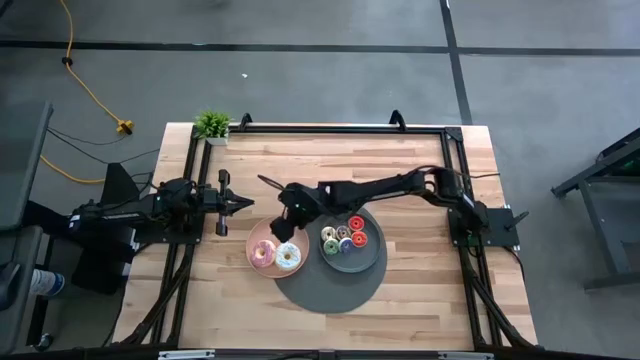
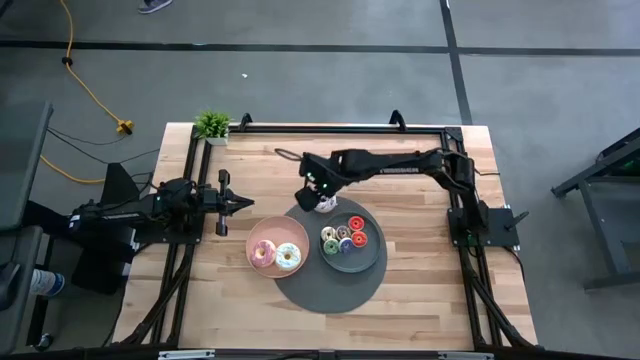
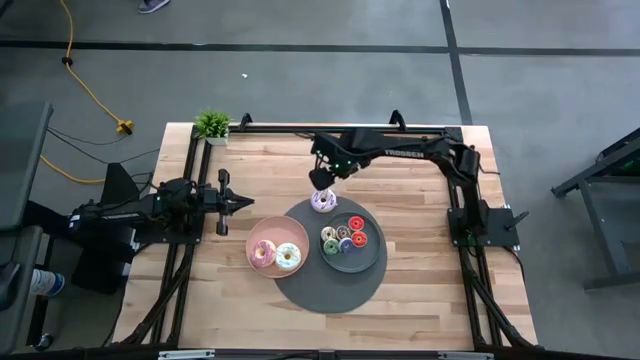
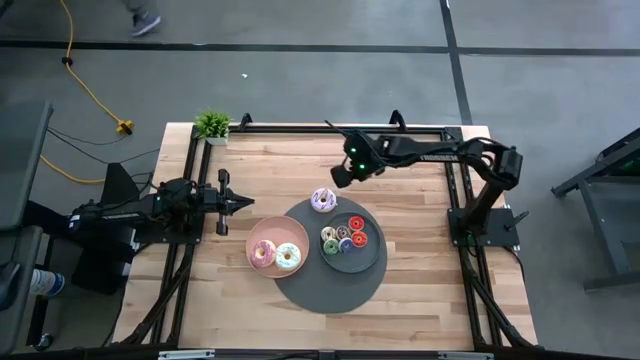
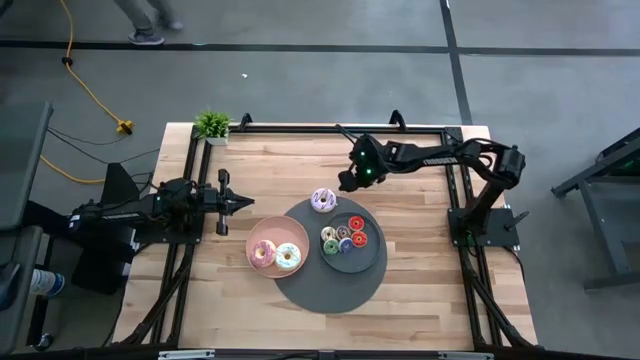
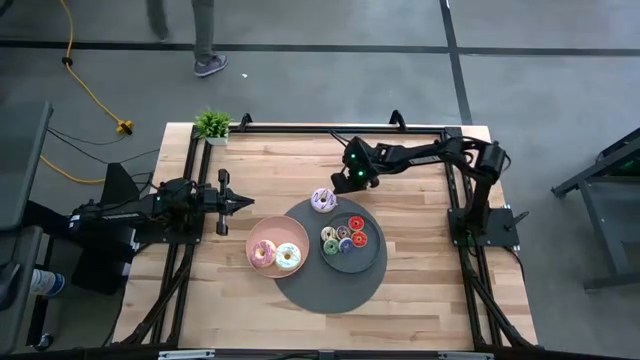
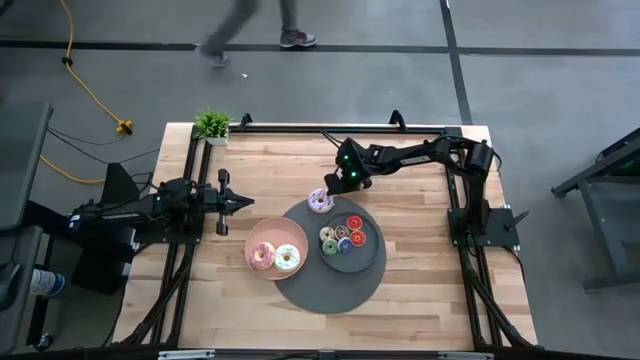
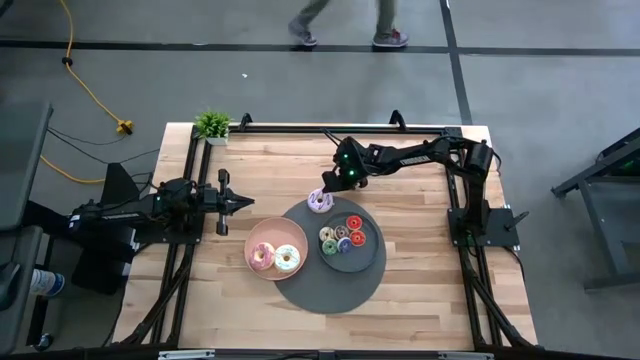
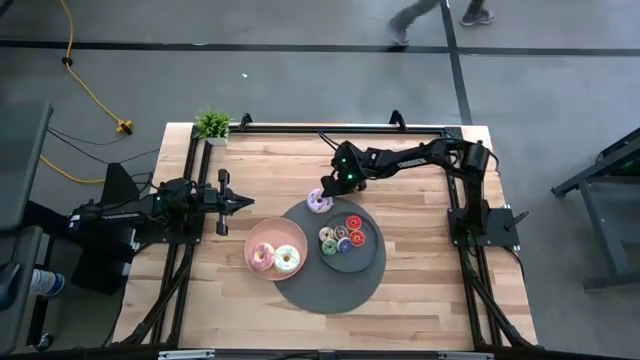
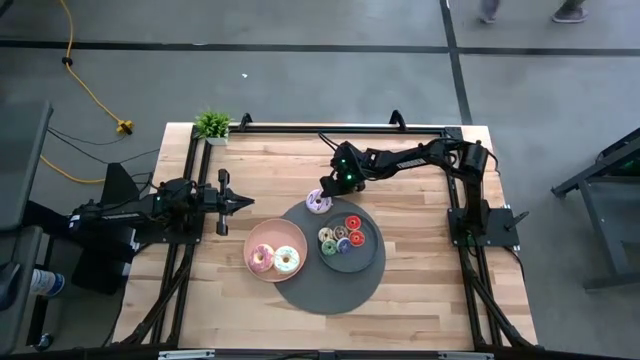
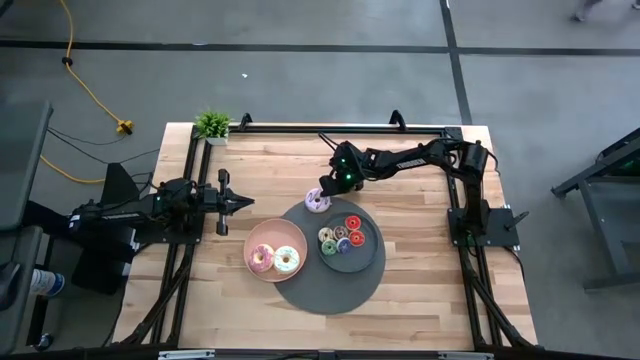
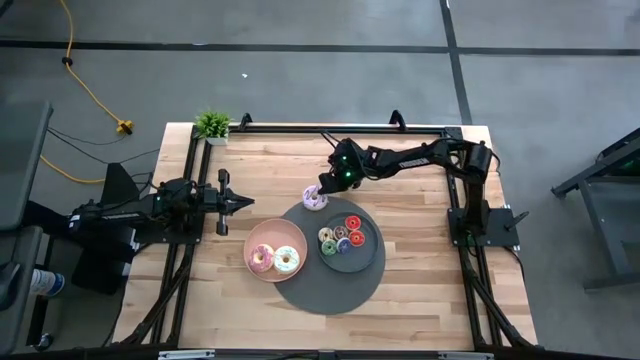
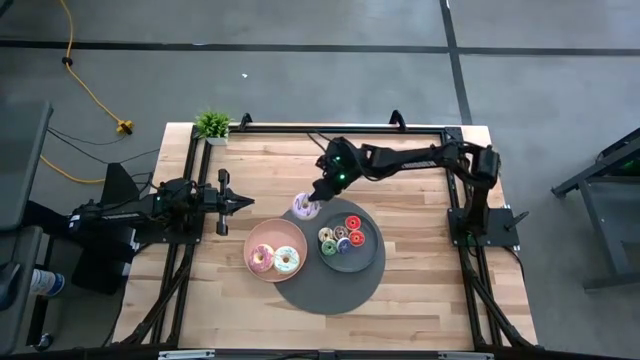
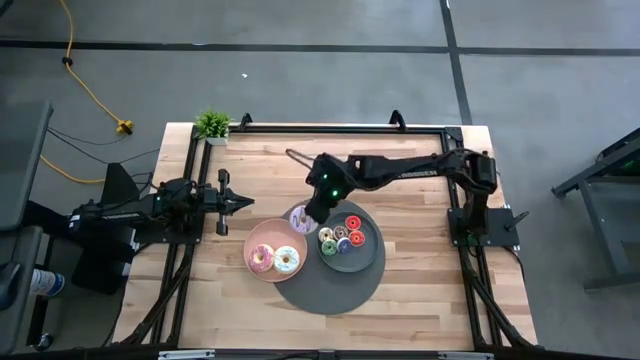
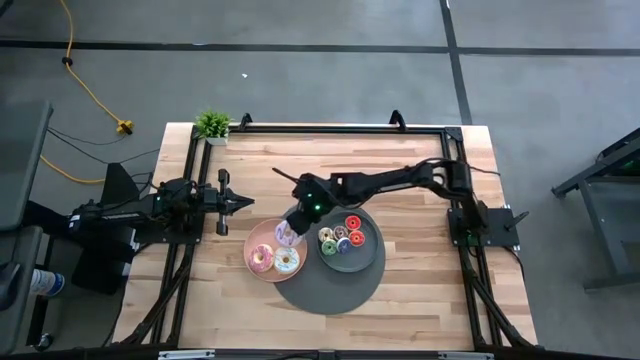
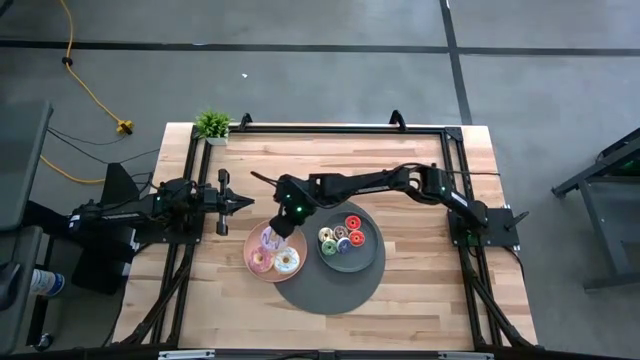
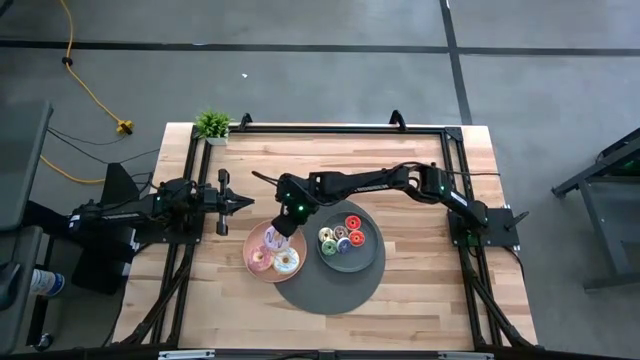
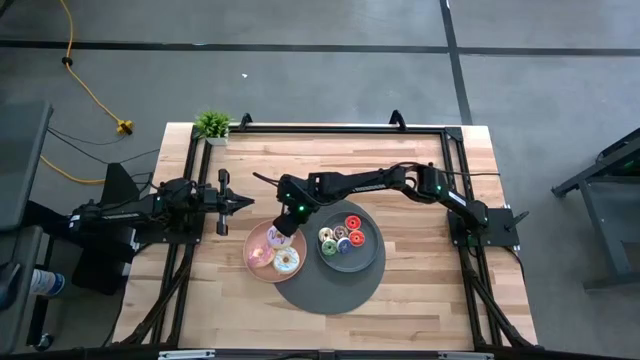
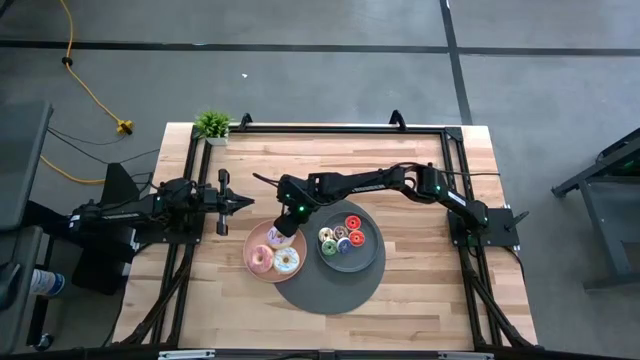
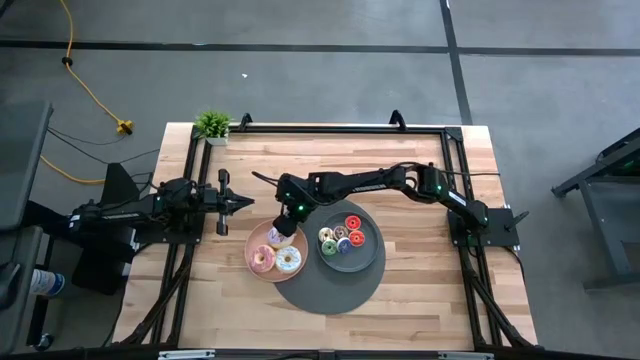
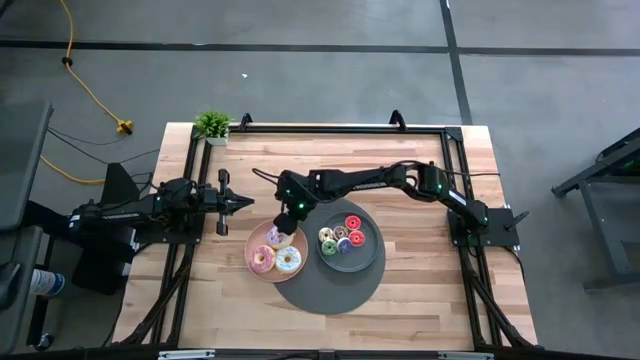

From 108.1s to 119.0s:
Task: Pick & Place donuts
Put the big purple donut on the pink plate

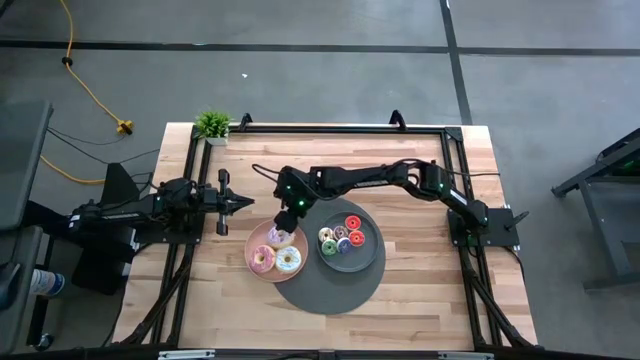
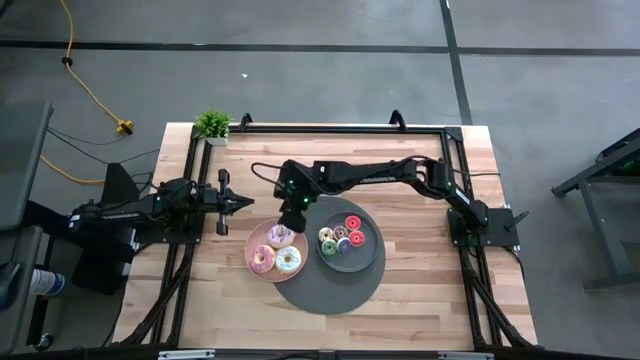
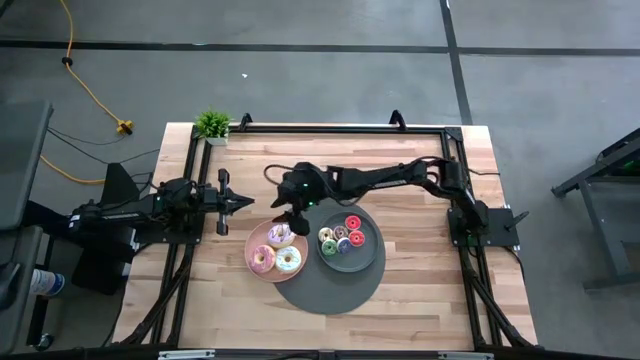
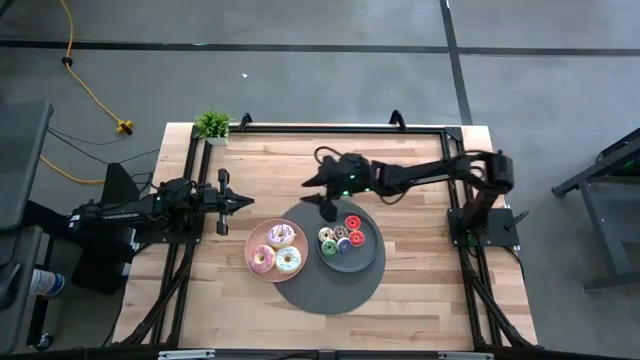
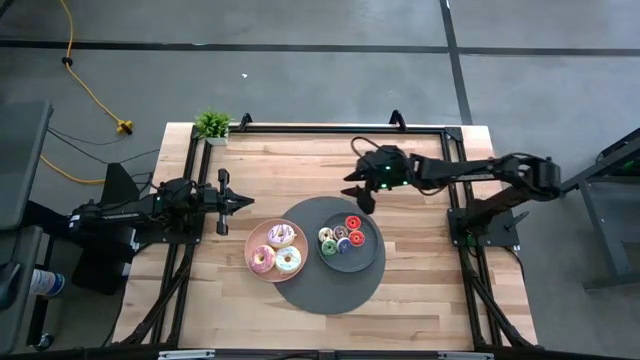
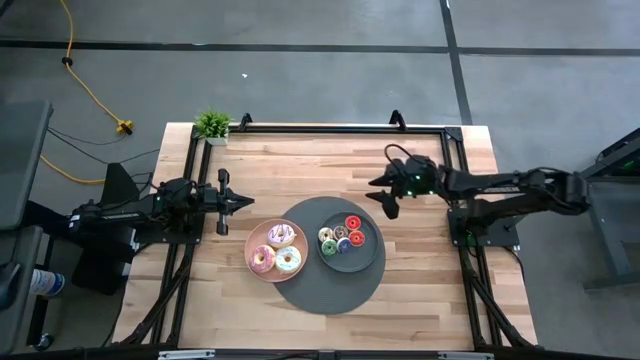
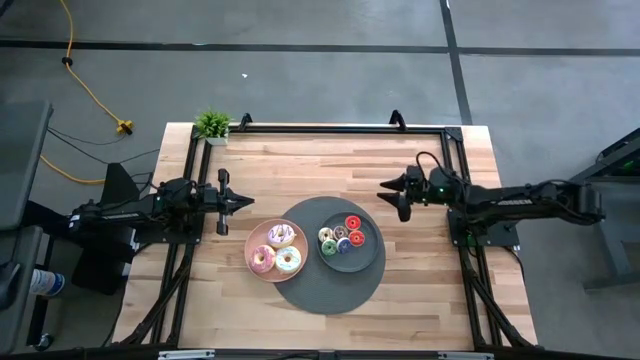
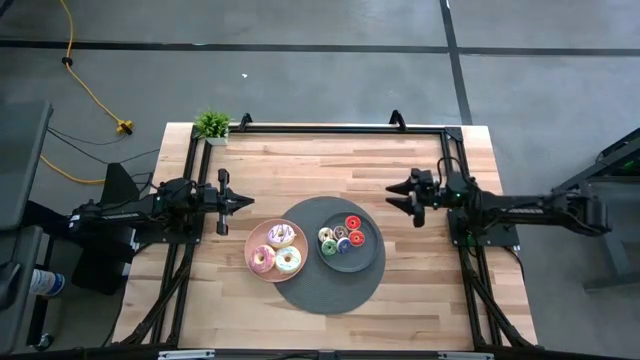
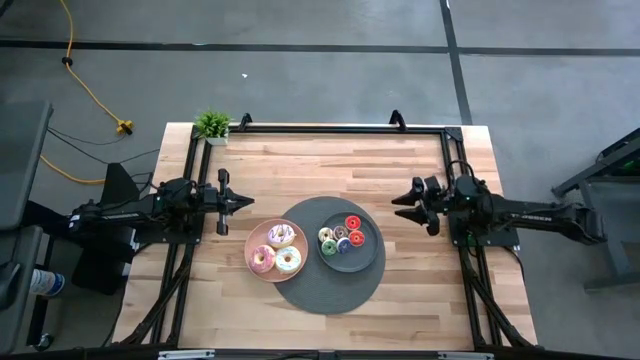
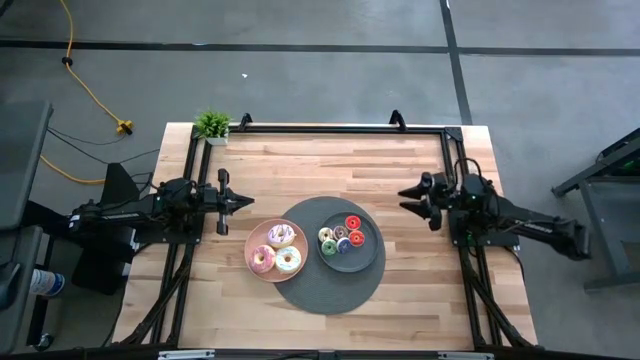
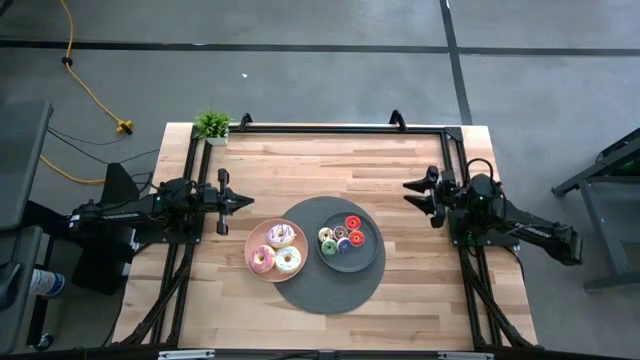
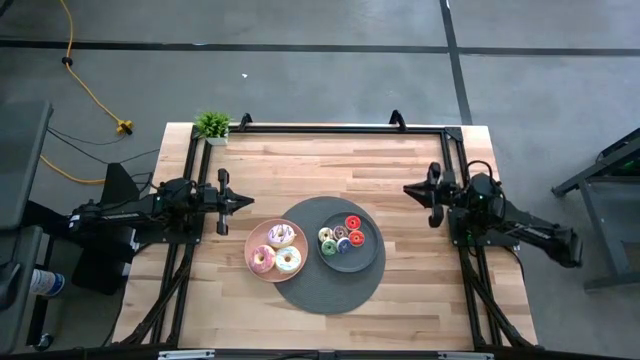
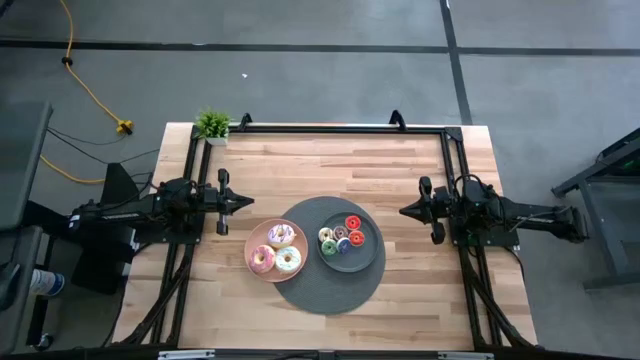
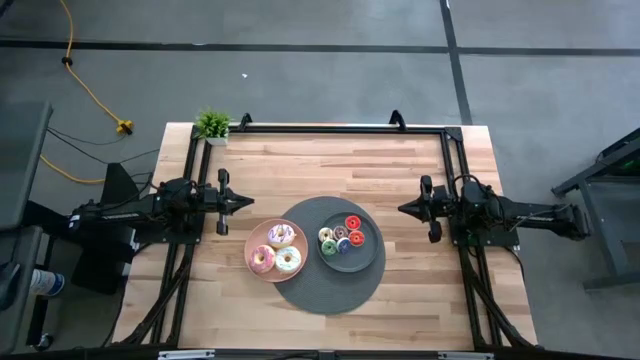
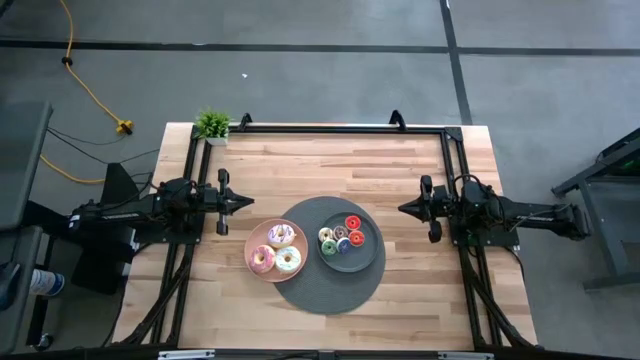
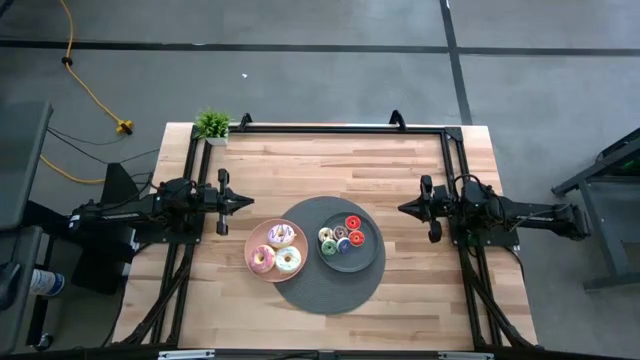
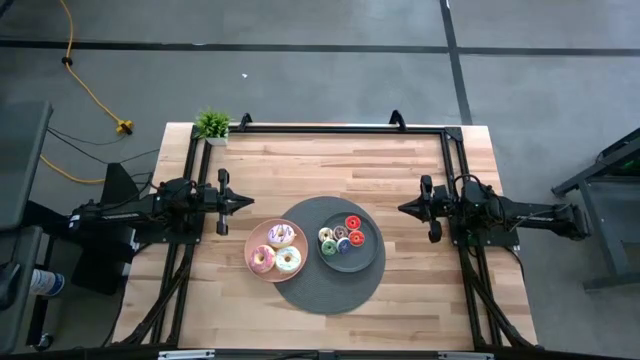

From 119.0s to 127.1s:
Return to Home Position

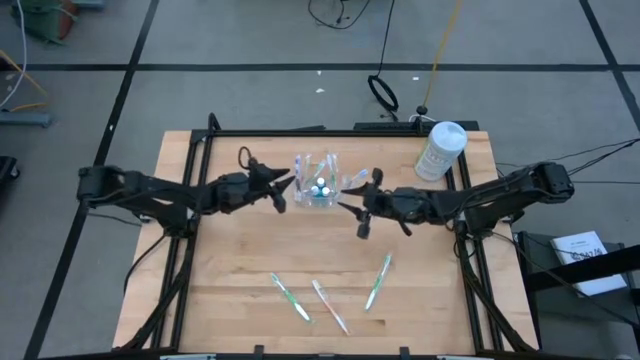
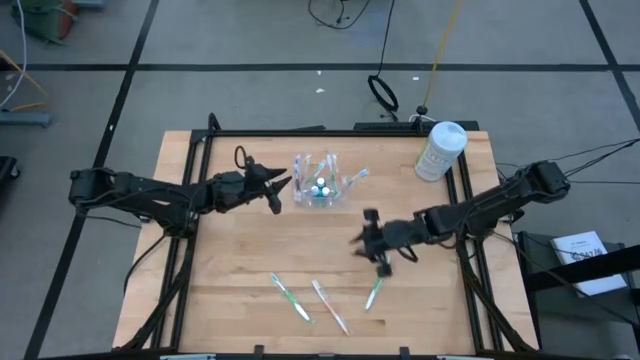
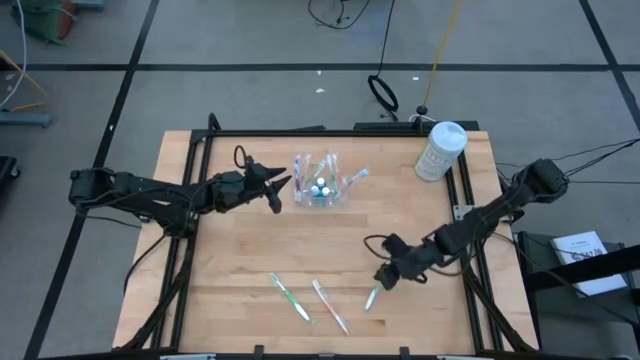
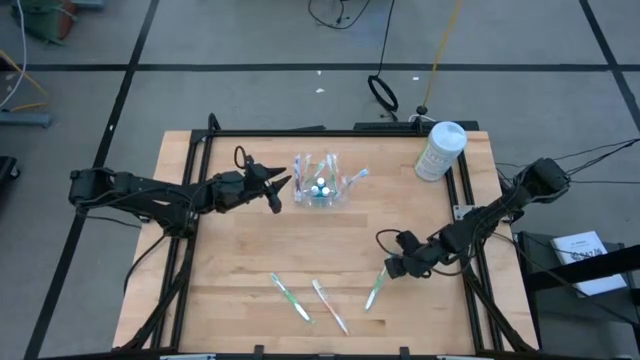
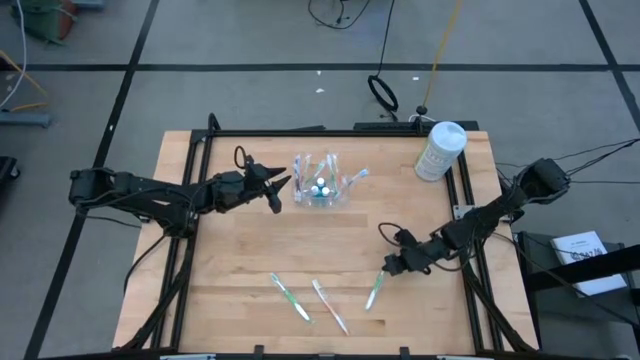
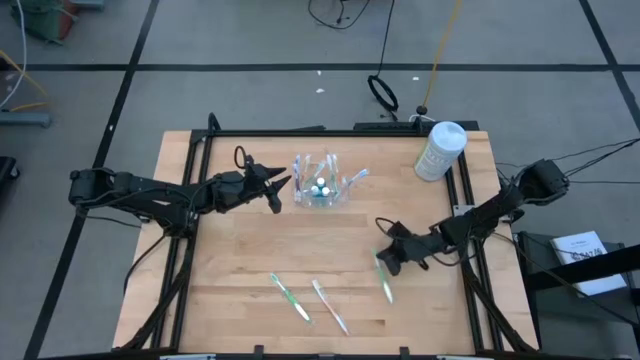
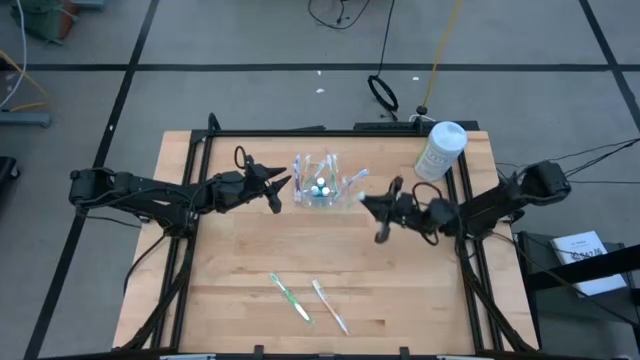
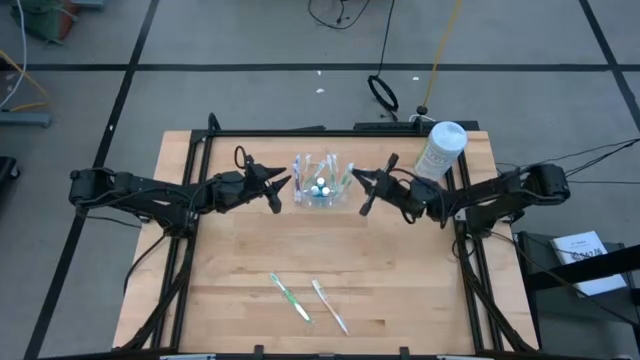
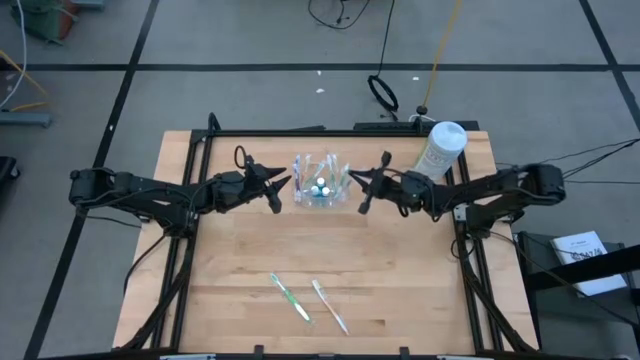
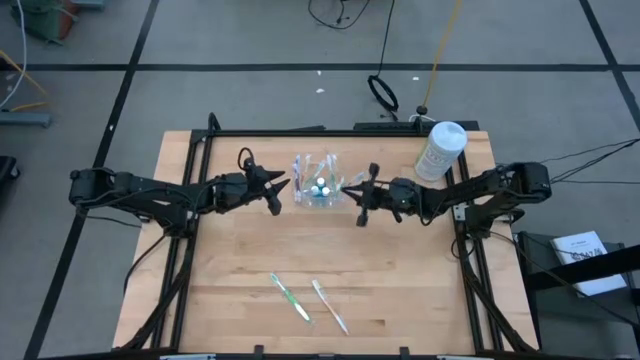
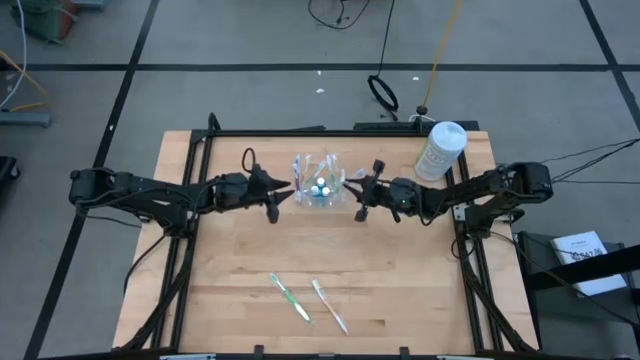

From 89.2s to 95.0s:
Task: Pick & Place Toothbrushes
Put the green toothbrush into the transparent organizer
